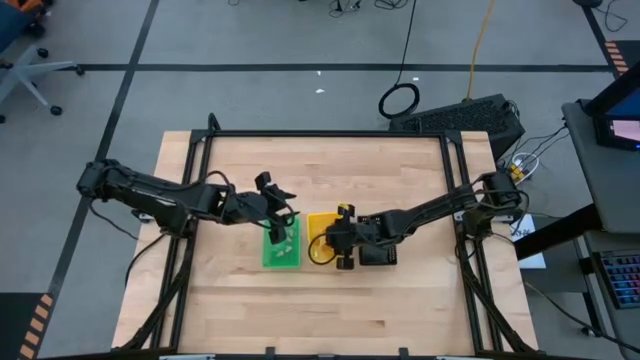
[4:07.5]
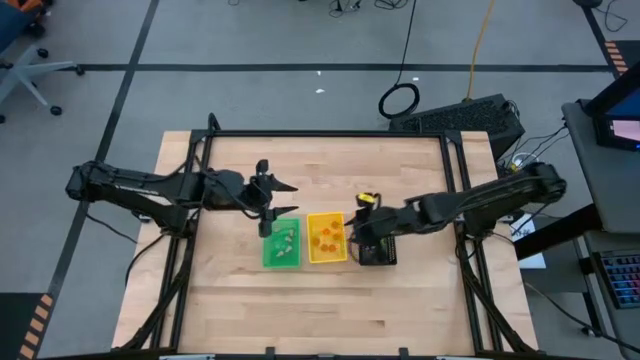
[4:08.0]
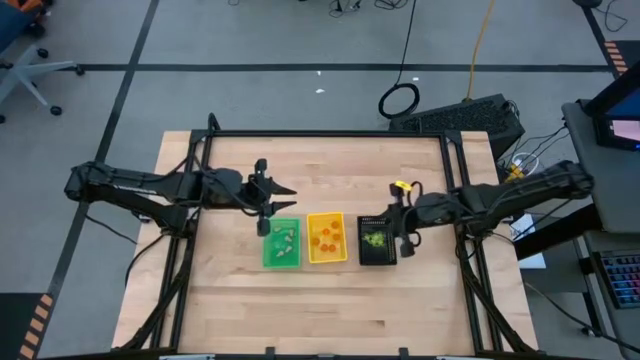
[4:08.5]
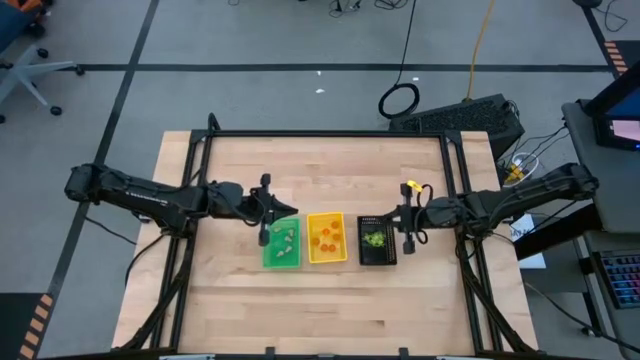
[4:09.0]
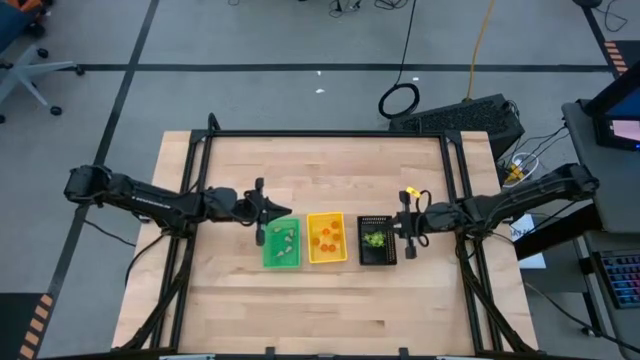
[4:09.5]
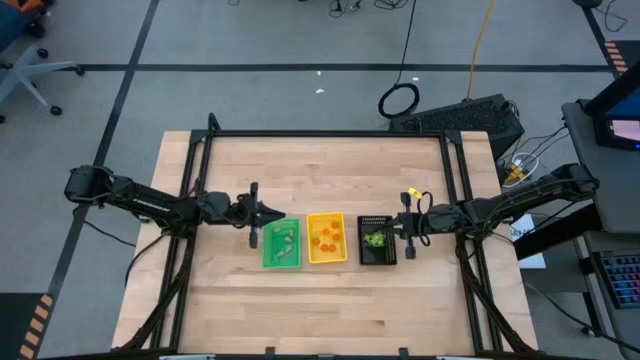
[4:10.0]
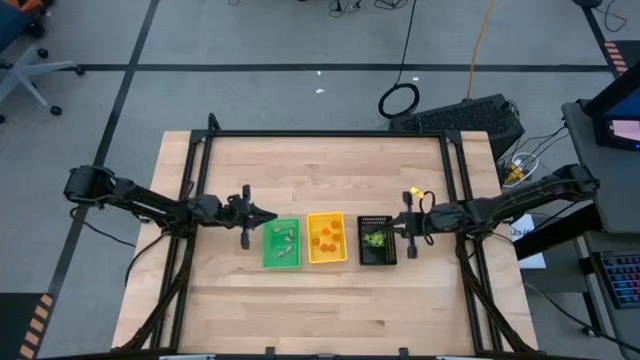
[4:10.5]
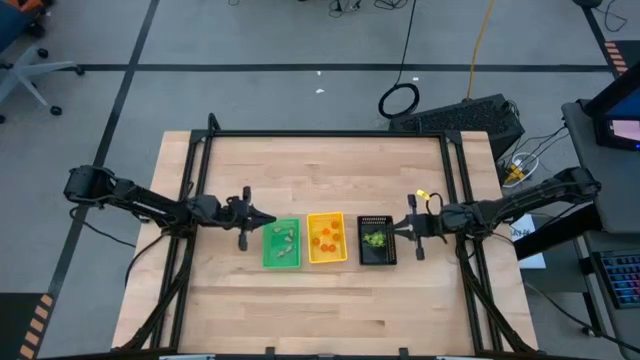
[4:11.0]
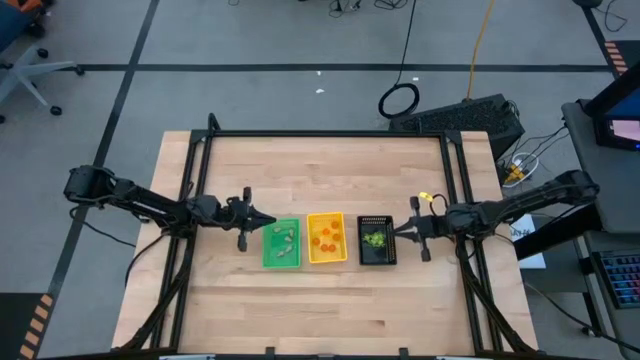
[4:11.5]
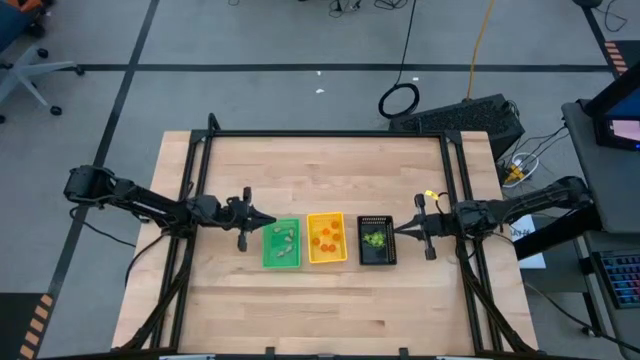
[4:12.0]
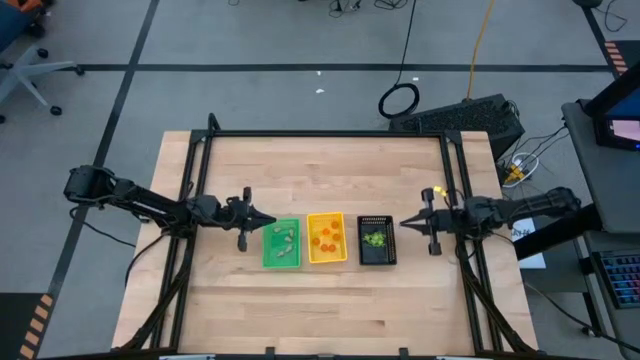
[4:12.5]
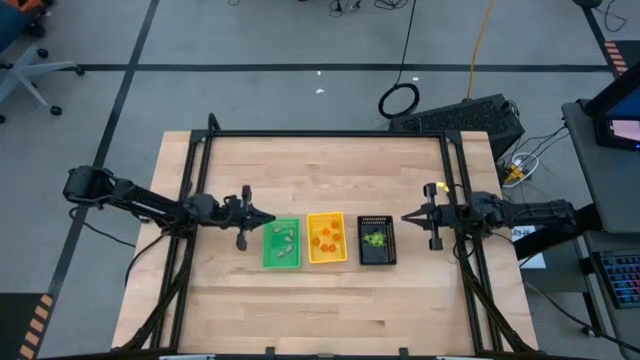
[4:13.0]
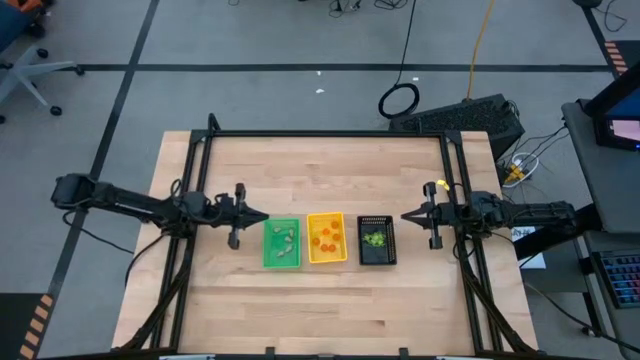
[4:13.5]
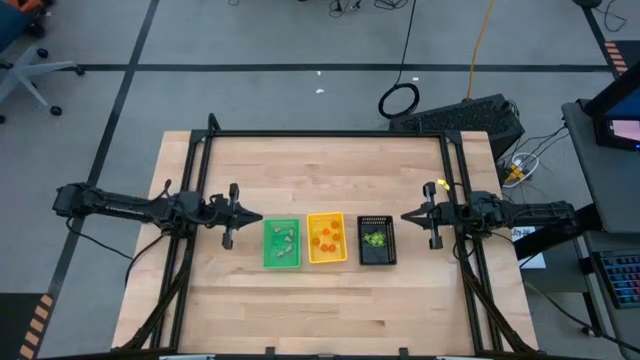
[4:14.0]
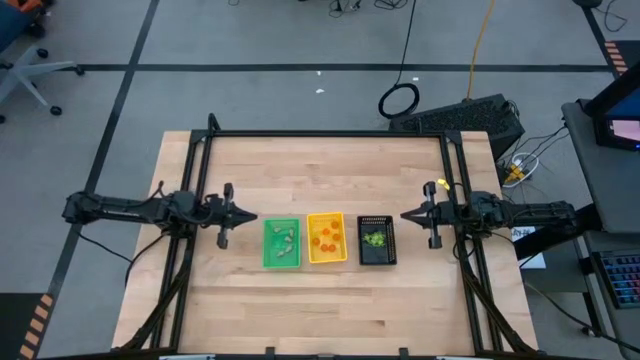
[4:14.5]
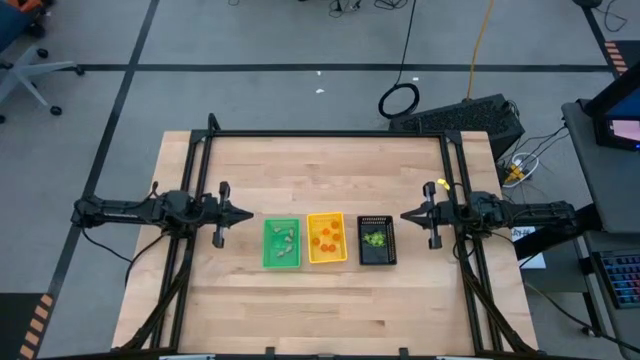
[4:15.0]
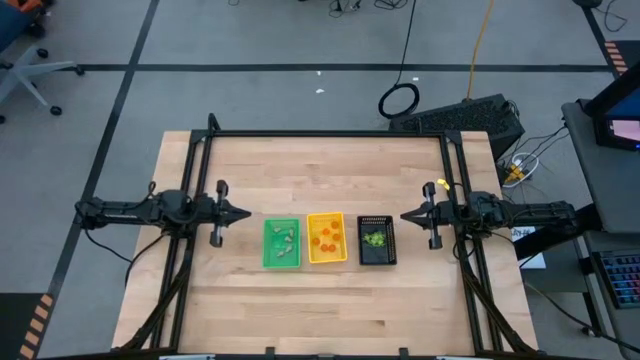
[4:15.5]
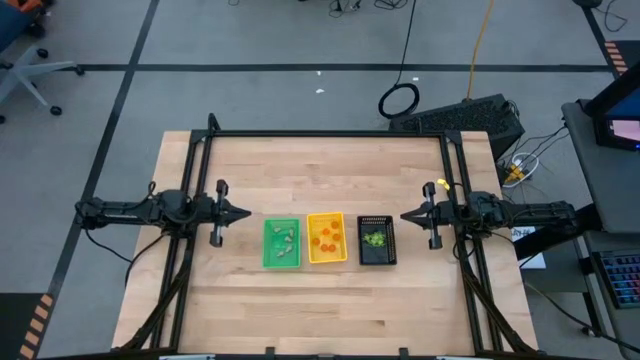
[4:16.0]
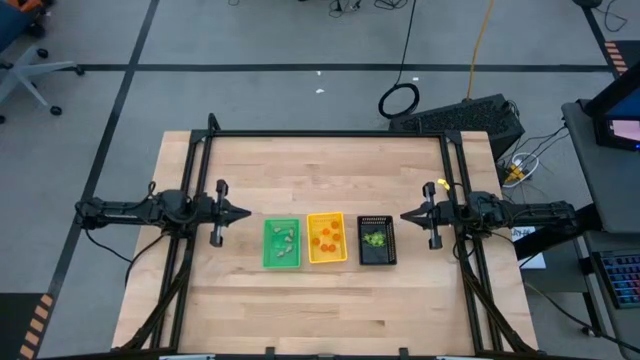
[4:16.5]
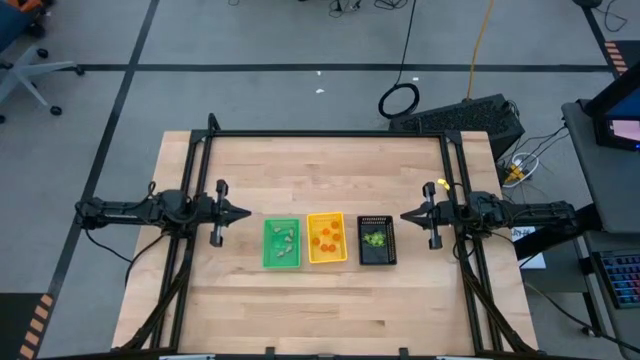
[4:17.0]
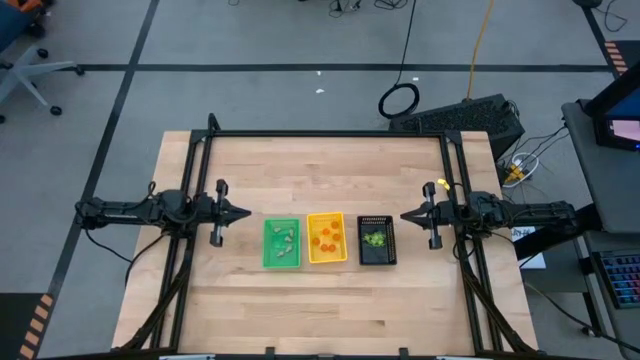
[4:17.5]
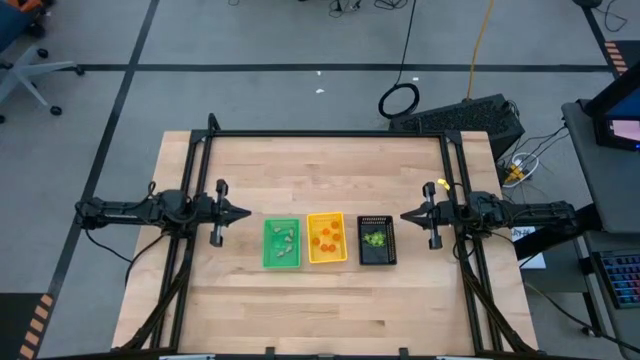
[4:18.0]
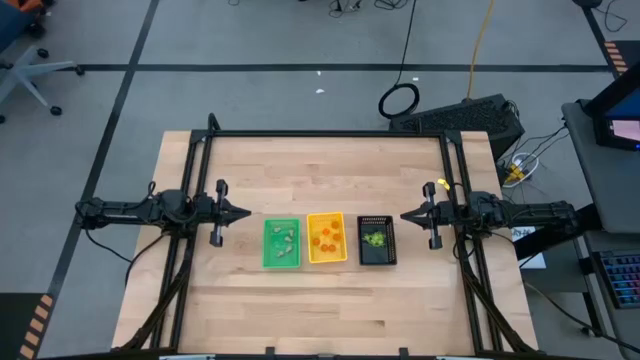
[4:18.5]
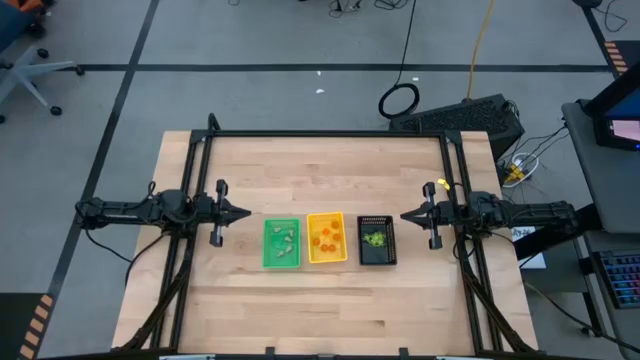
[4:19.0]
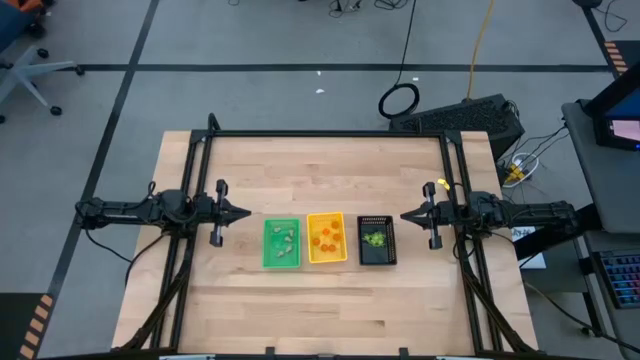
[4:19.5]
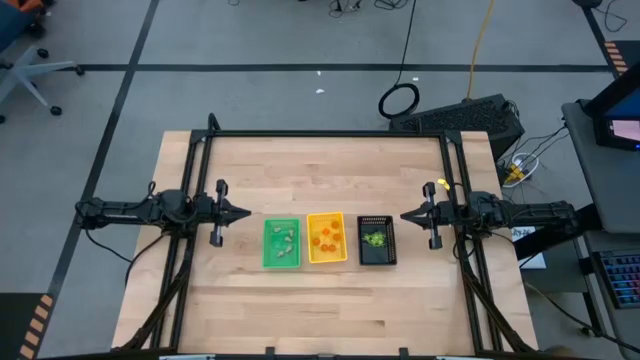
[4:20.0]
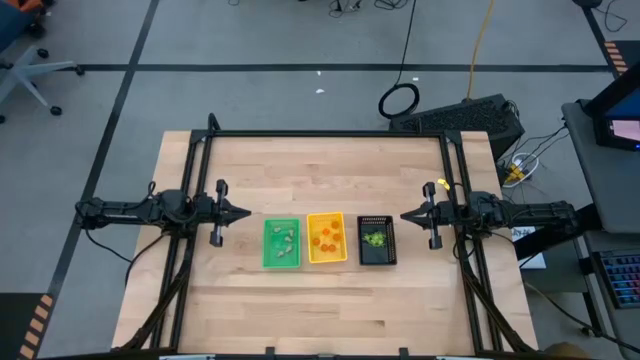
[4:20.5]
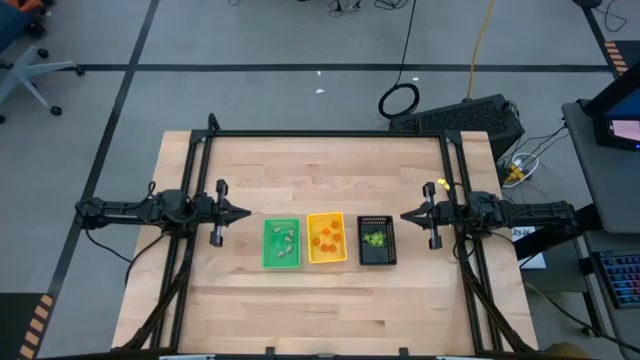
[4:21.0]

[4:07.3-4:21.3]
Task: Sort Halloween decoration
Return to Home Position
